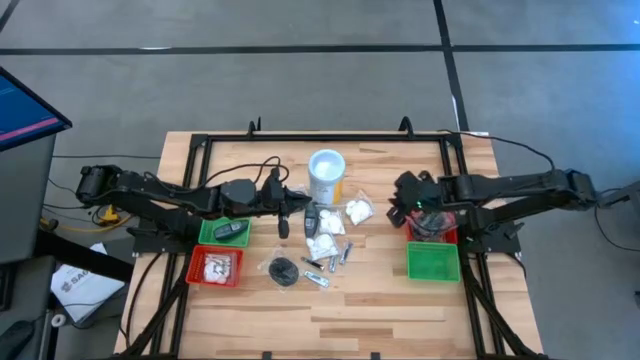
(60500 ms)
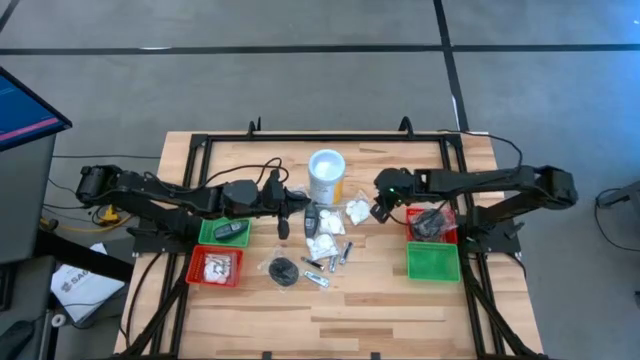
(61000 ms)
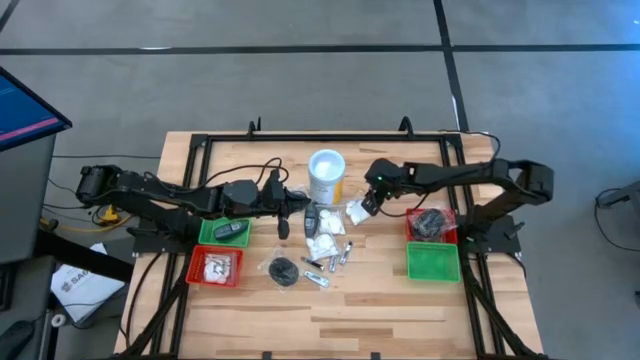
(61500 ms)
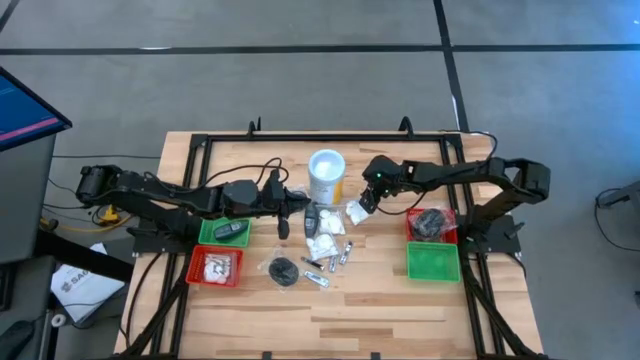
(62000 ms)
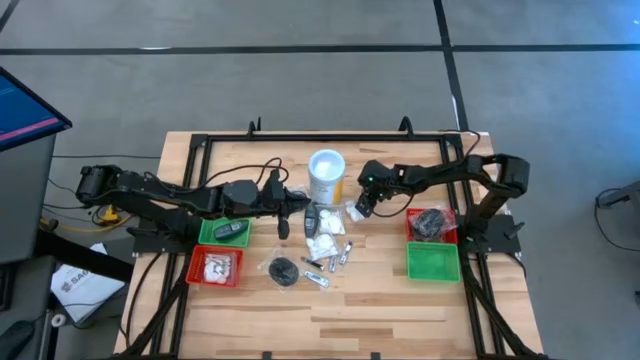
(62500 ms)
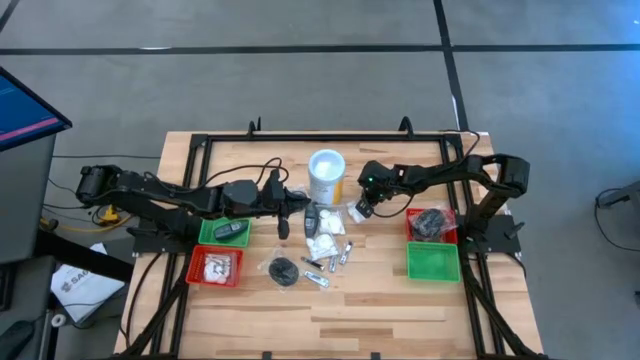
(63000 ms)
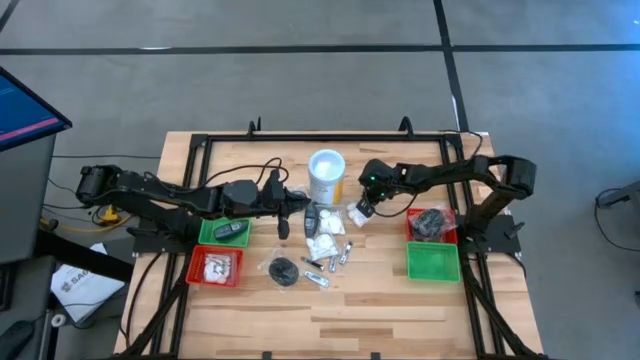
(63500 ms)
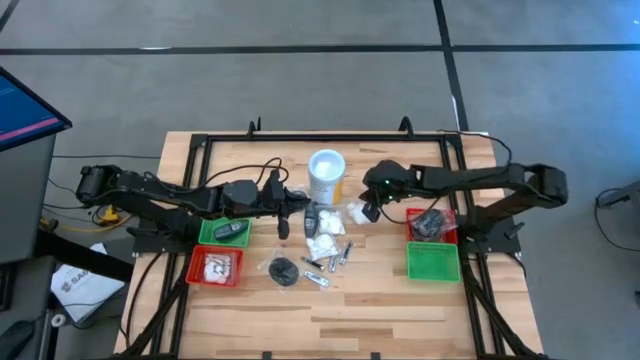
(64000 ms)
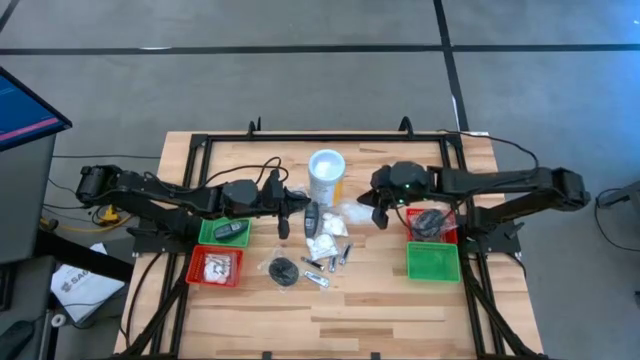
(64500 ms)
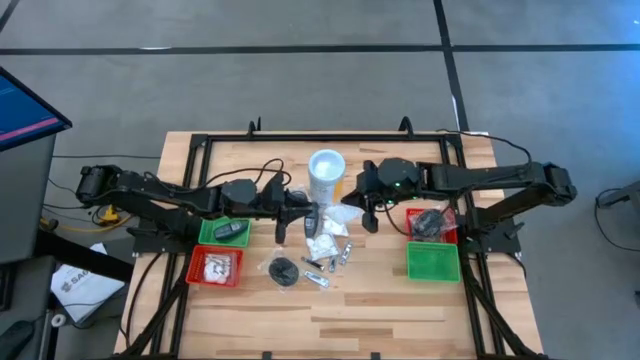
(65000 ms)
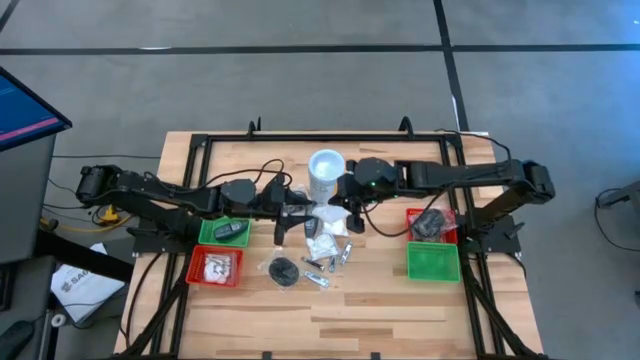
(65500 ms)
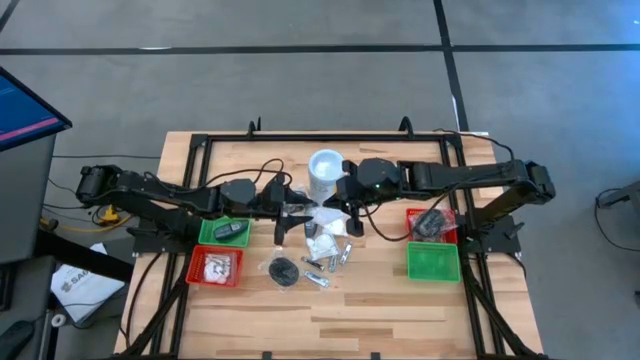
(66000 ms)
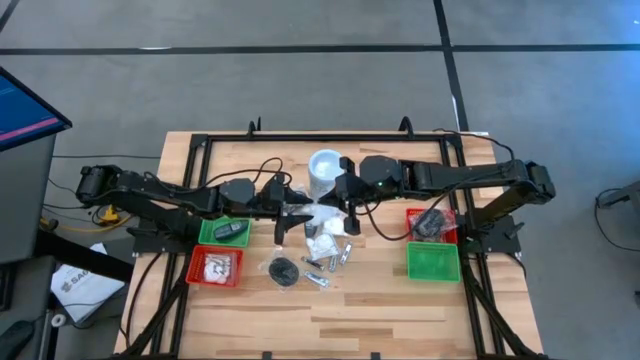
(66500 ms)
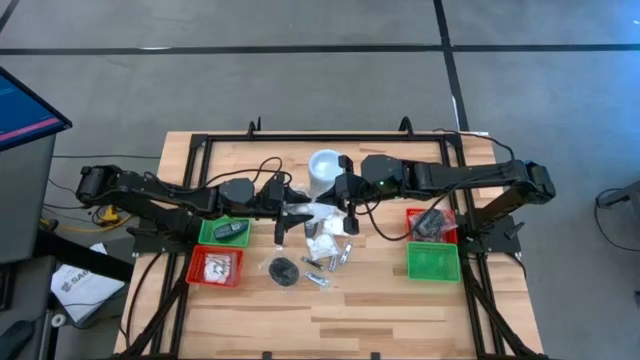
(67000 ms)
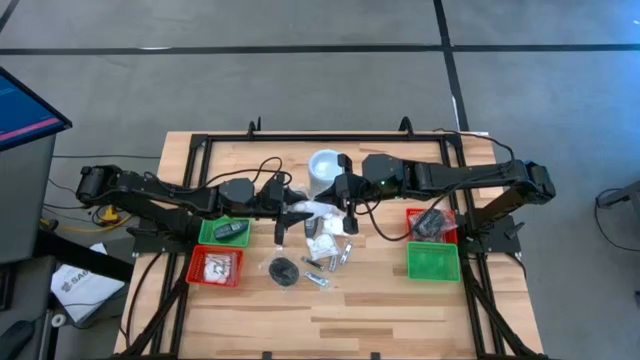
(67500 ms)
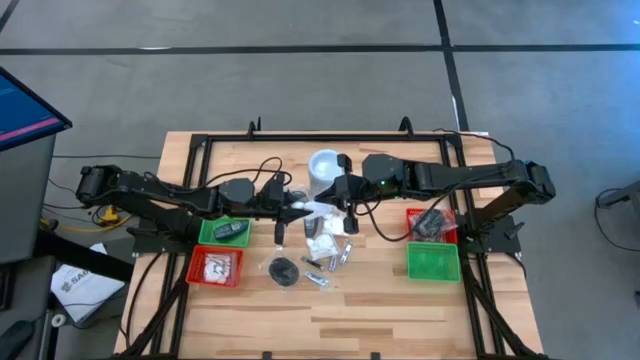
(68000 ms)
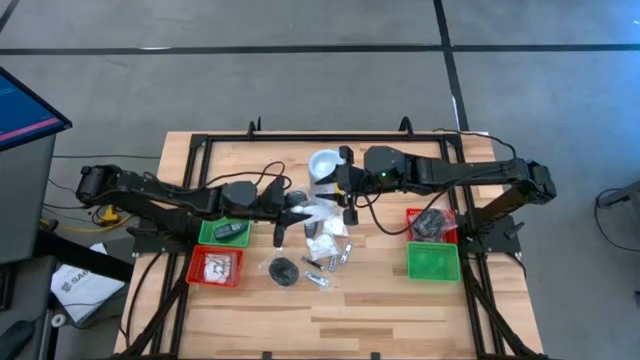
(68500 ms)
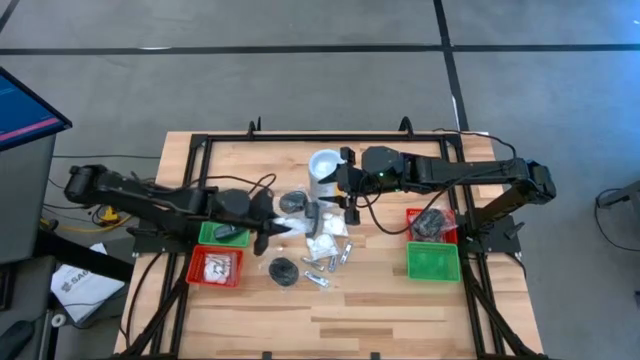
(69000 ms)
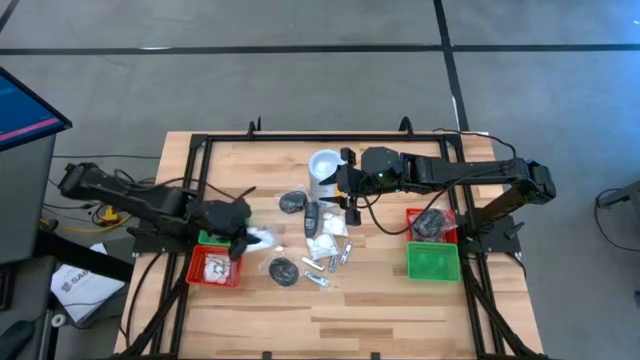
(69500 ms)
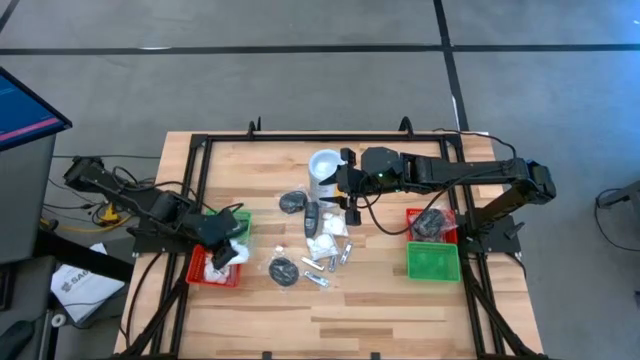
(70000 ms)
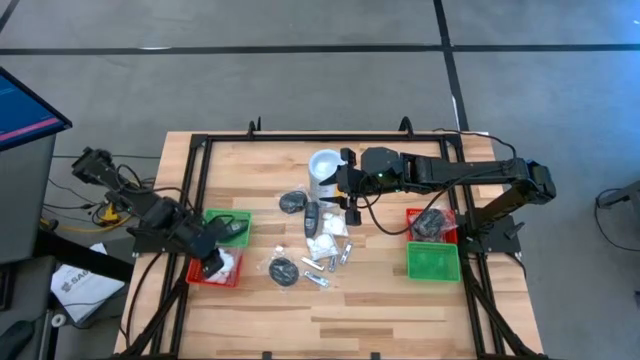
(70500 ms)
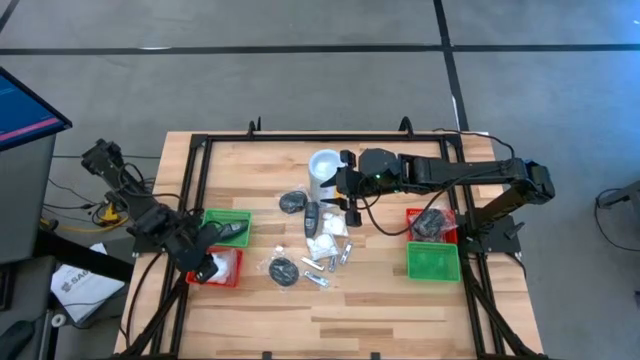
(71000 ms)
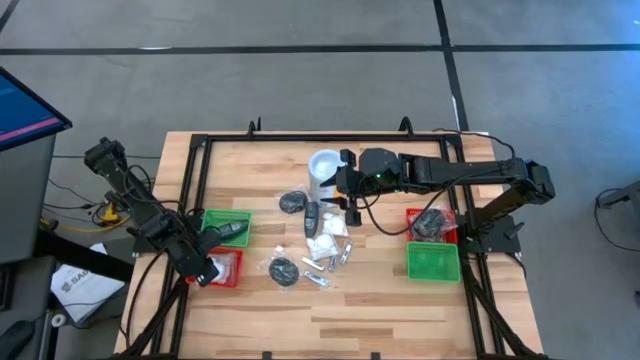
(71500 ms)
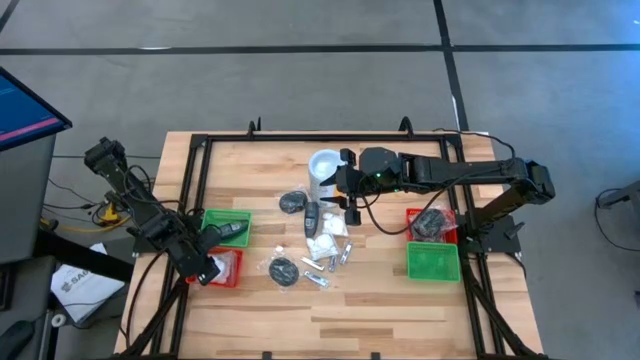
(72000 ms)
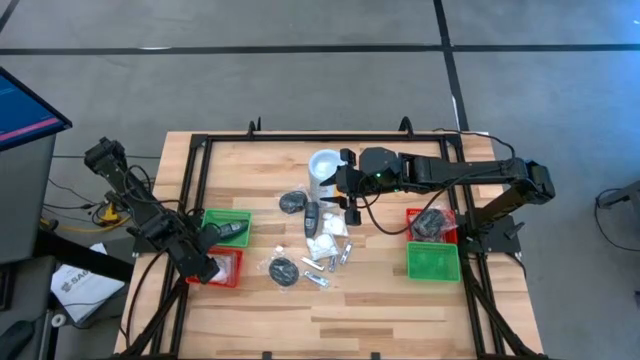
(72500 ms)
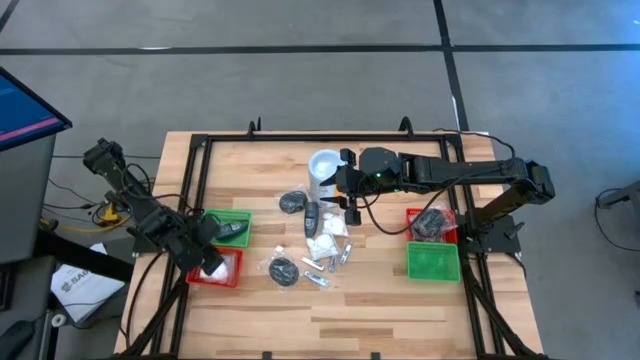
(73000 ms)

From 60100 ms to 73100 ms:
Task: Pick & Place Travel size toiletries
Put the cotton pack into the left red bin

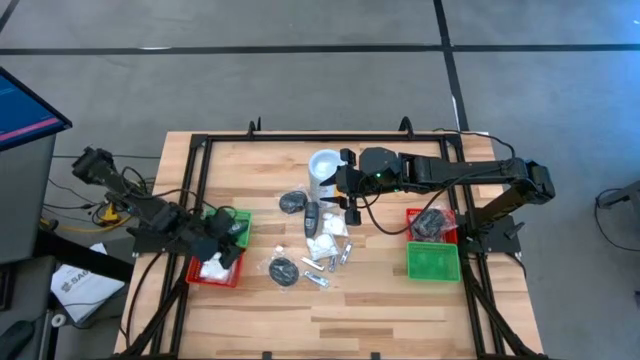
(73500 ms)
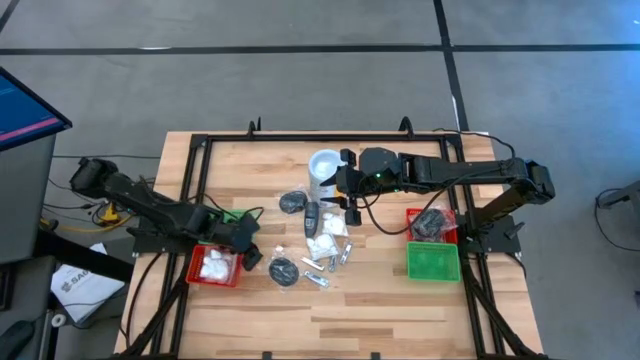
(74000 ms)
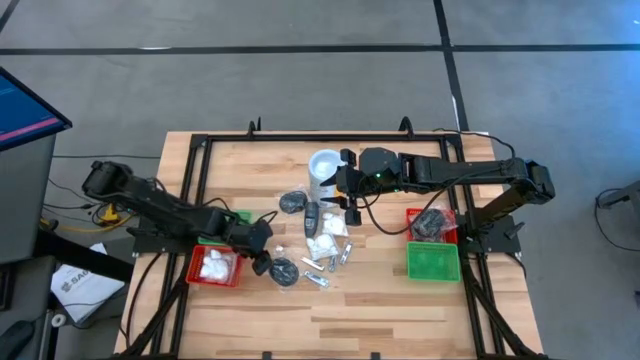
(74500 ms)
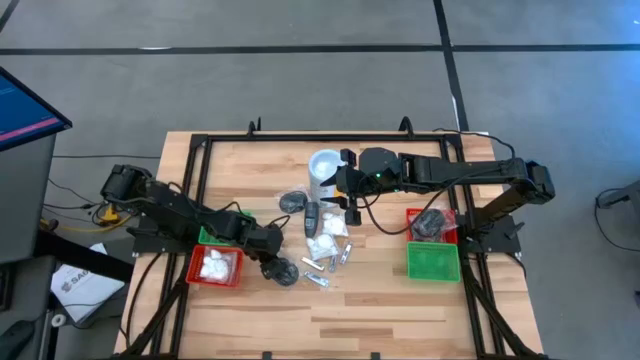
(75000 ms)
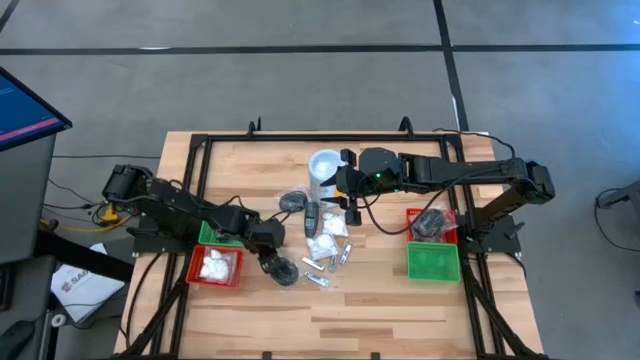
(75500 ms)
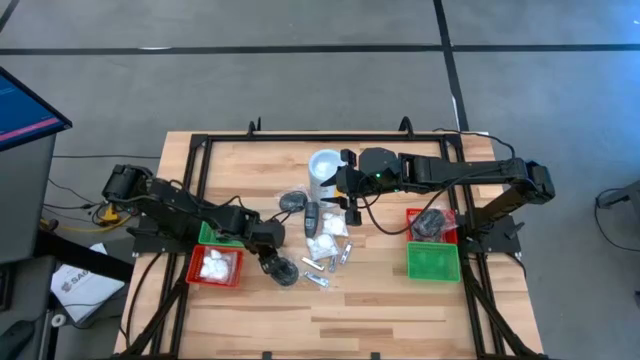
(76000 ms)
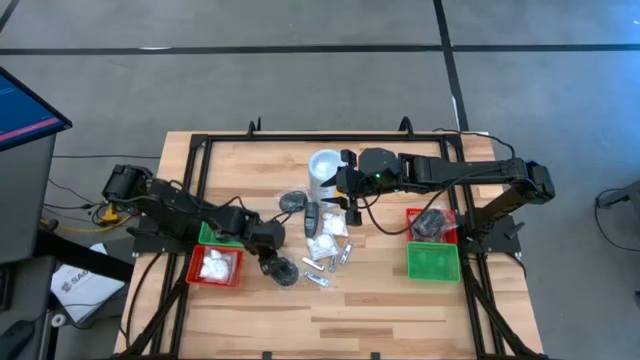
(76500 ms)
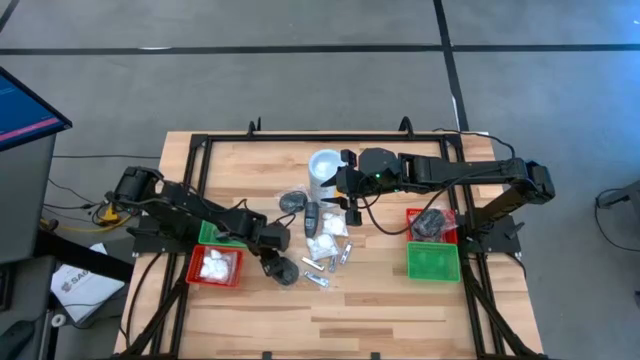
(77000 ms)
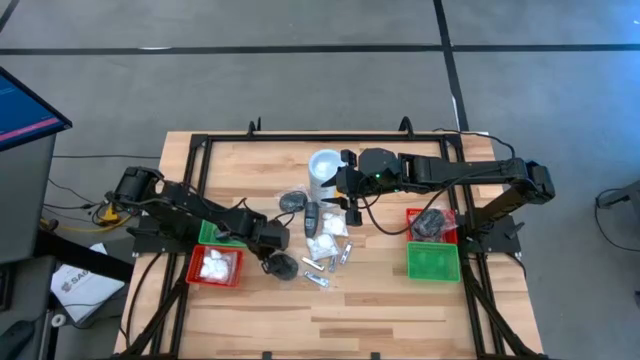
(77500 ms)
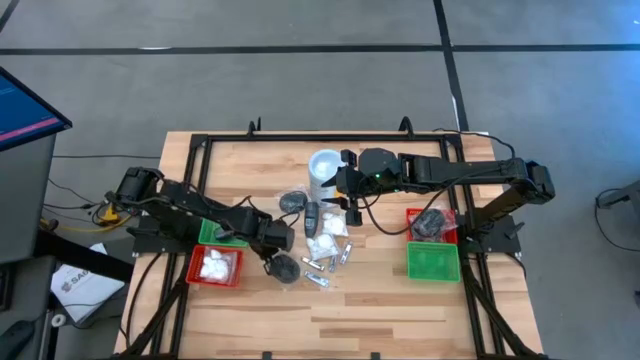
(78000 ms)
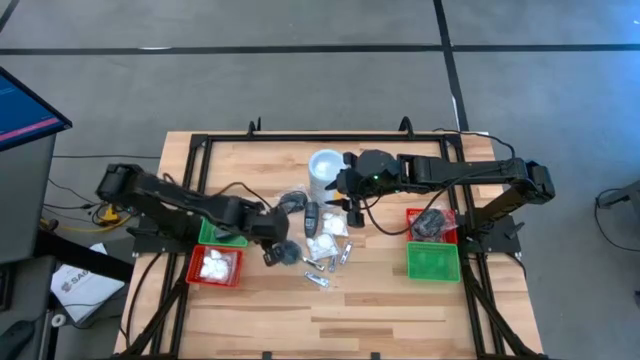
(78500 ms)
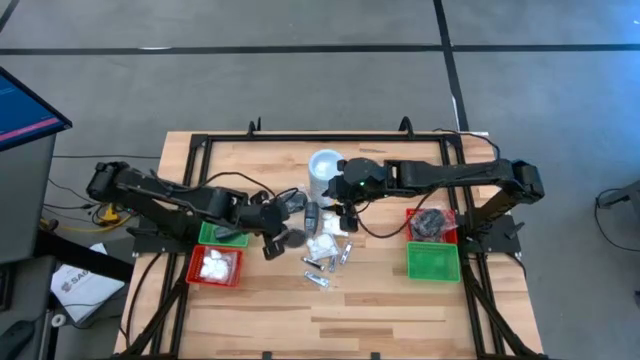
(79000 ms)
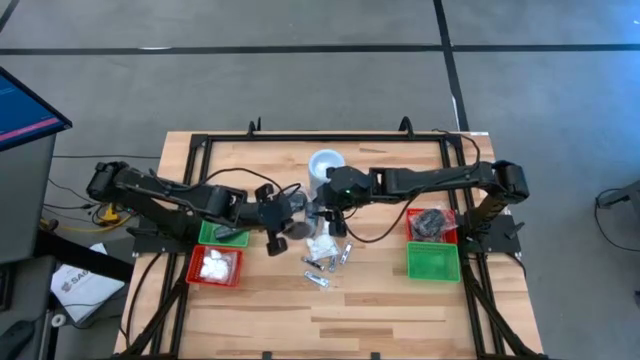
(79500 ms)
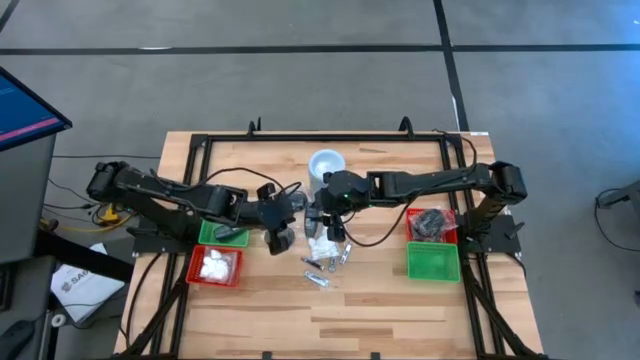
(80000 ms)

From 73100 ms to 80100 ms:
Put the hairbrush into the right red bin

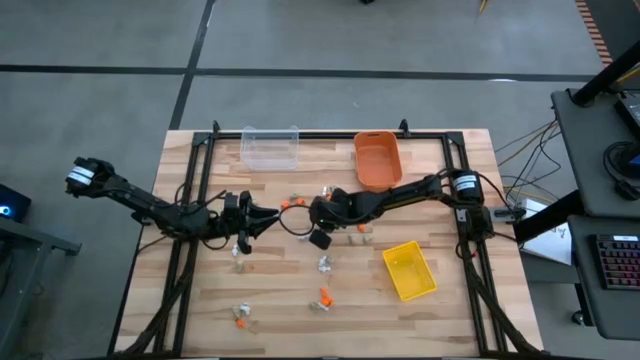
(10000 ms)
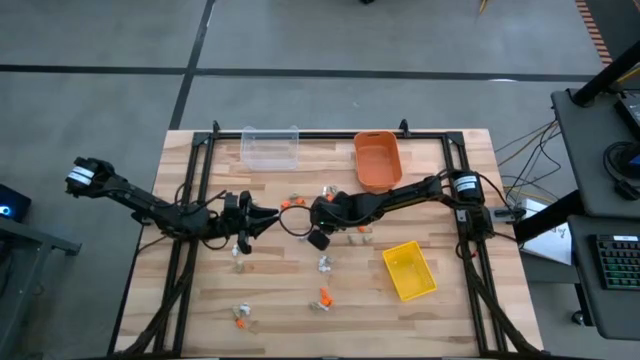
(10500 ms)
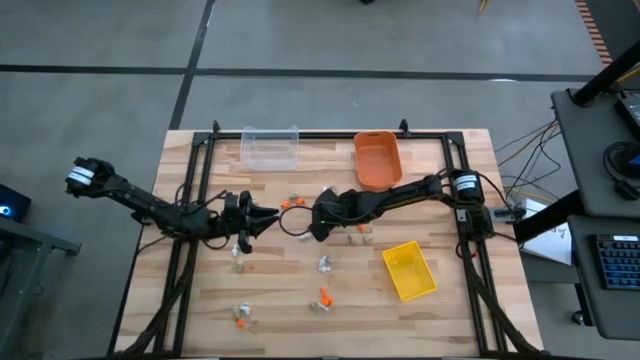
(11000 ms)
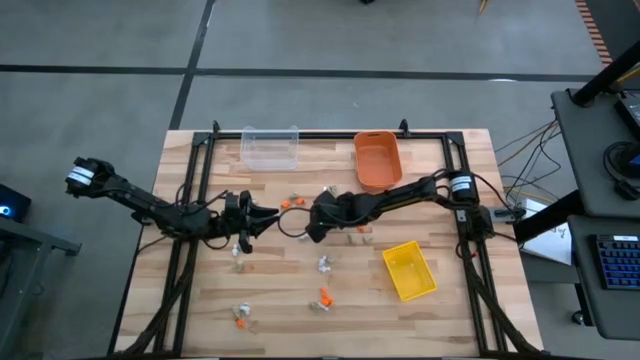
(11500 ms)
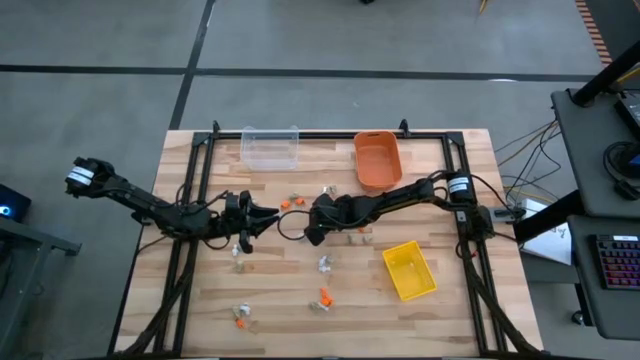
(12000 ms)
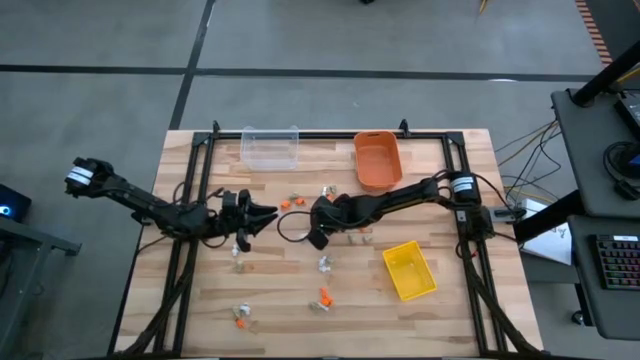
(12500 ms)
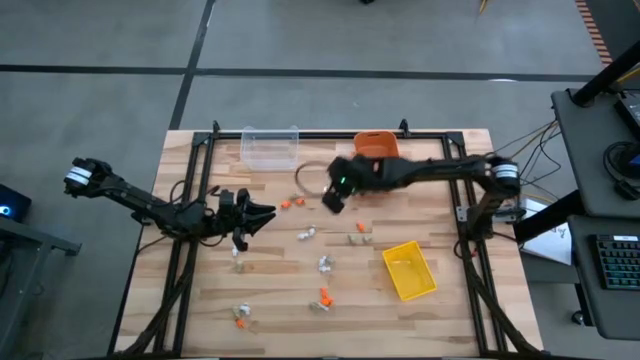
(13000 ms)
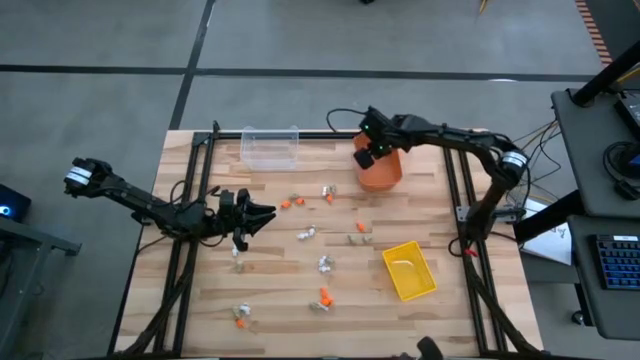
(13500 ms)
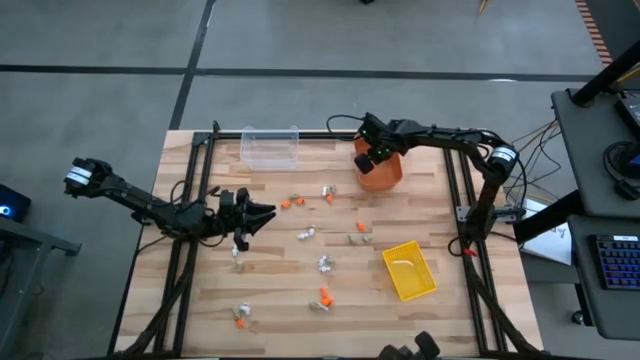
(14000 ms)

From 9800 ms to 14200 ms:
Task: Sort Halloween decoration
Put the orange skeleton toy into the orange bin
